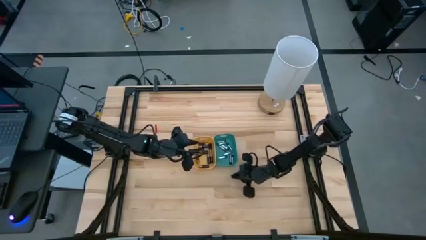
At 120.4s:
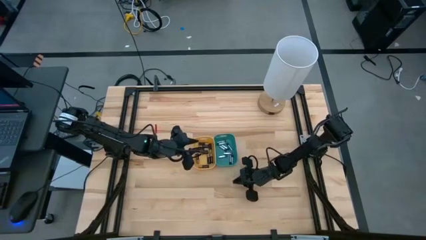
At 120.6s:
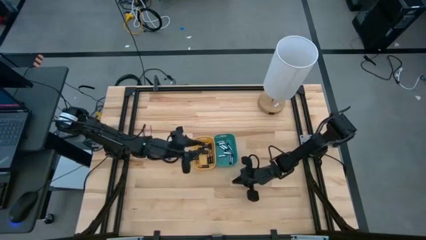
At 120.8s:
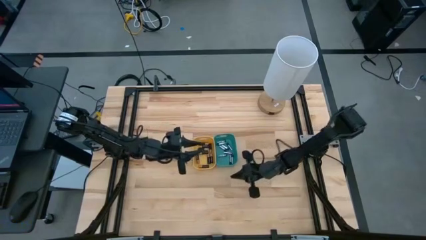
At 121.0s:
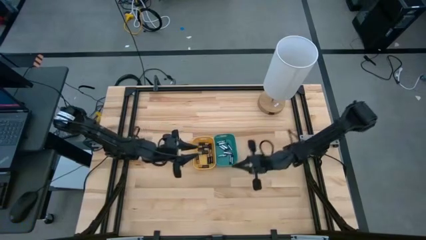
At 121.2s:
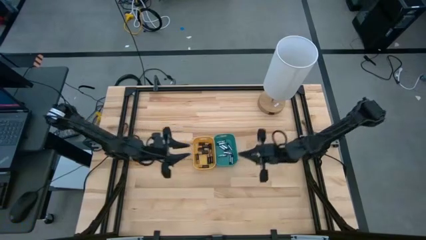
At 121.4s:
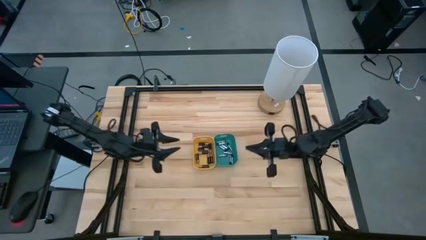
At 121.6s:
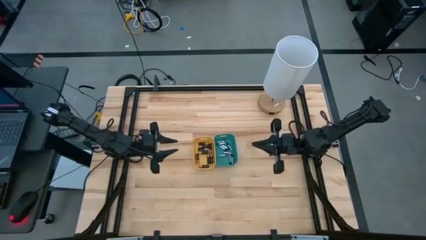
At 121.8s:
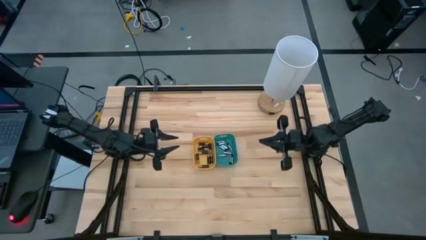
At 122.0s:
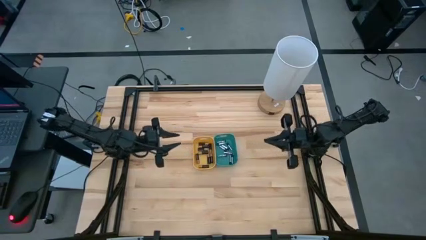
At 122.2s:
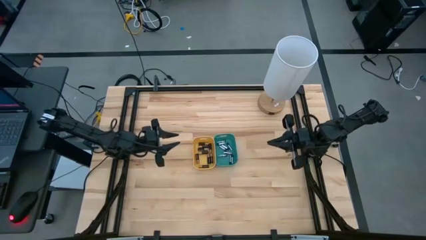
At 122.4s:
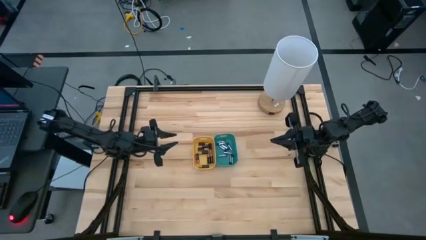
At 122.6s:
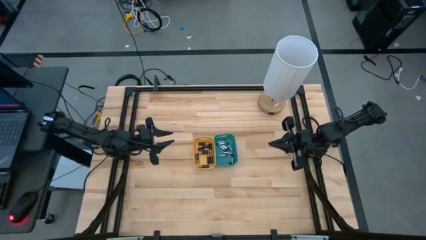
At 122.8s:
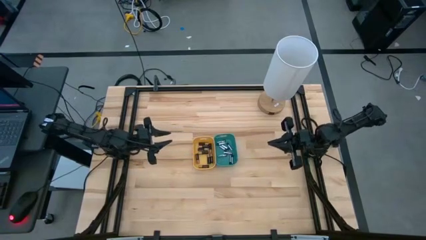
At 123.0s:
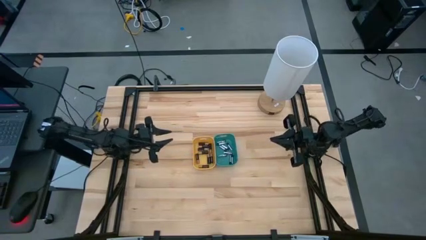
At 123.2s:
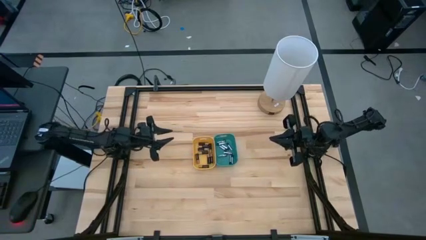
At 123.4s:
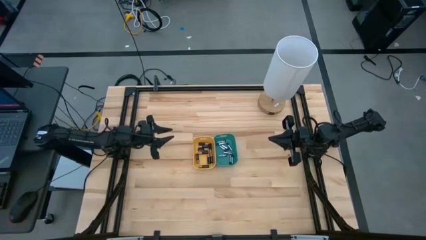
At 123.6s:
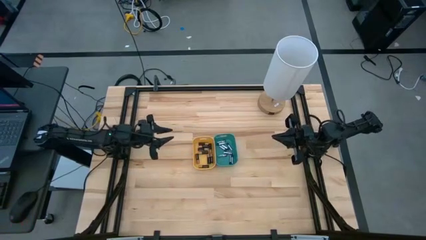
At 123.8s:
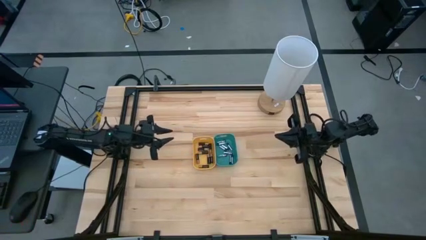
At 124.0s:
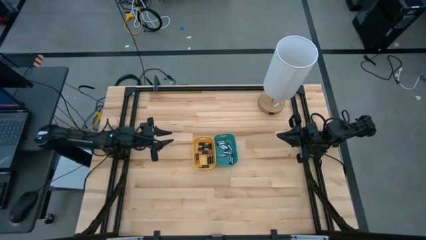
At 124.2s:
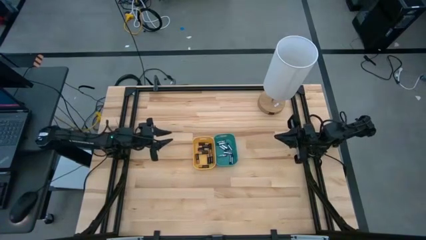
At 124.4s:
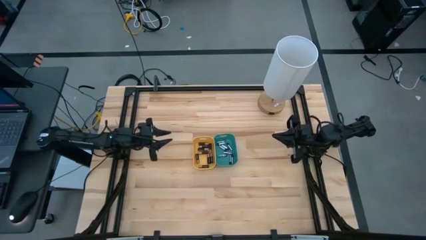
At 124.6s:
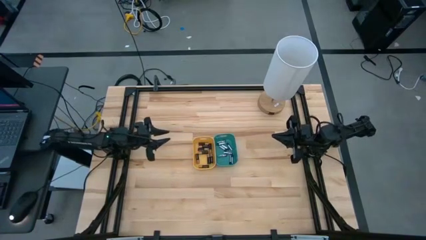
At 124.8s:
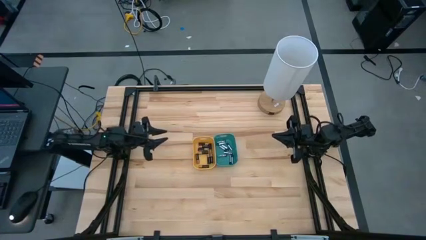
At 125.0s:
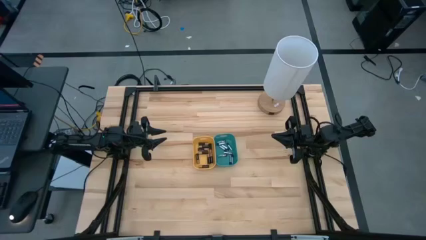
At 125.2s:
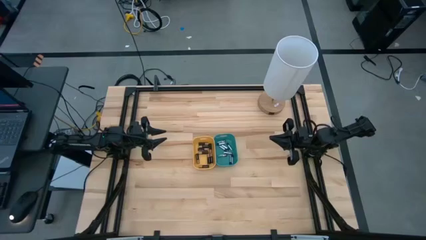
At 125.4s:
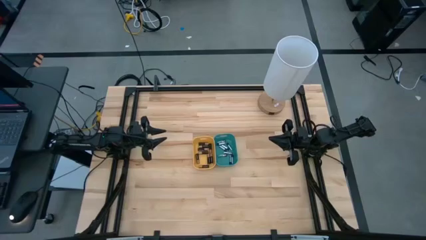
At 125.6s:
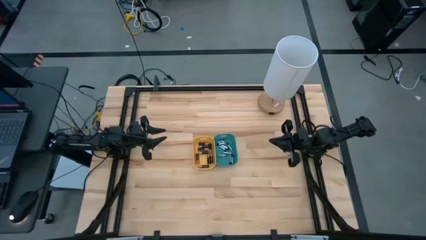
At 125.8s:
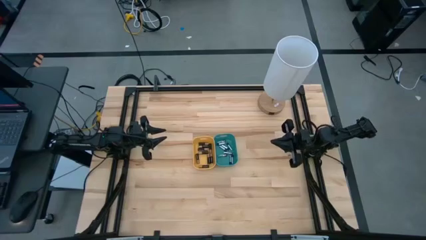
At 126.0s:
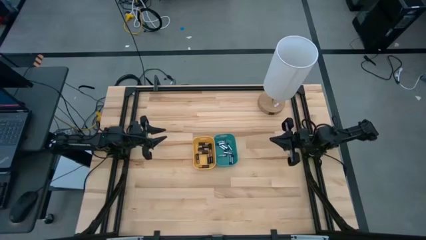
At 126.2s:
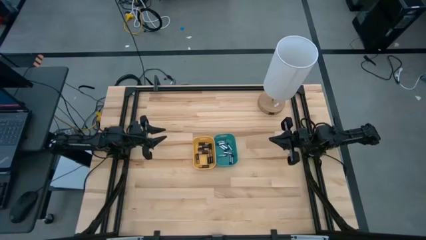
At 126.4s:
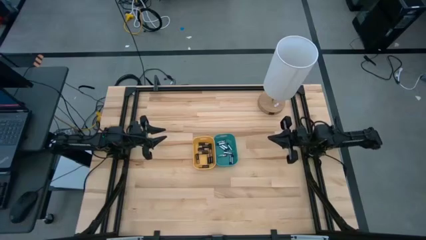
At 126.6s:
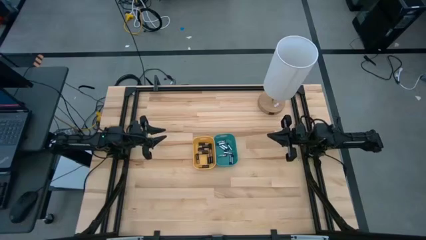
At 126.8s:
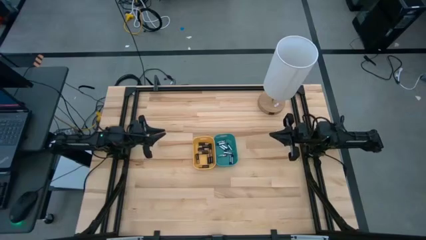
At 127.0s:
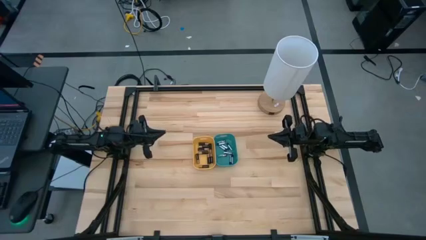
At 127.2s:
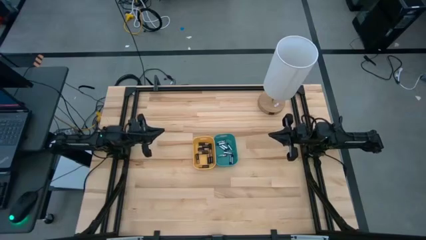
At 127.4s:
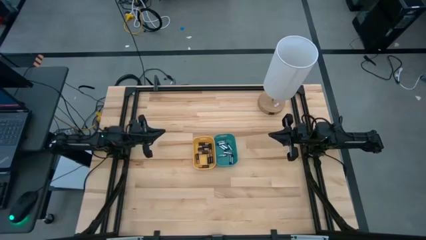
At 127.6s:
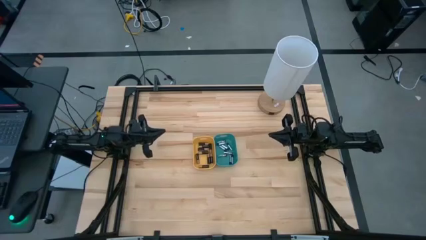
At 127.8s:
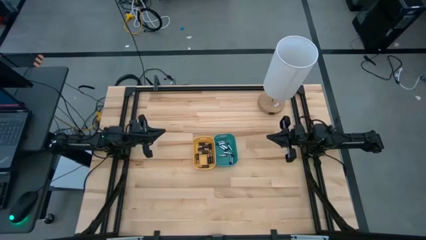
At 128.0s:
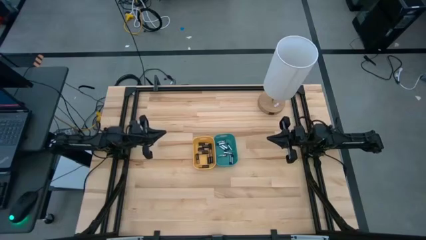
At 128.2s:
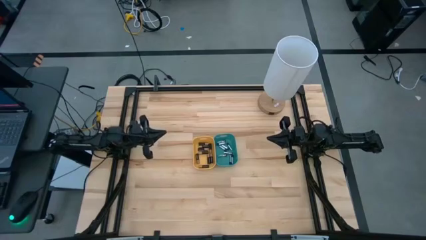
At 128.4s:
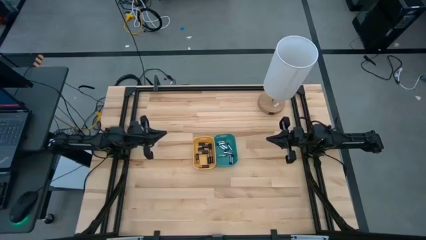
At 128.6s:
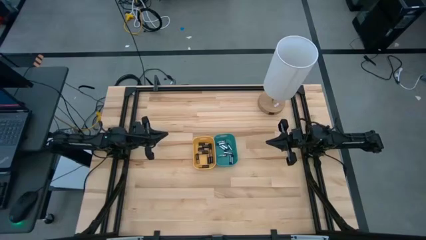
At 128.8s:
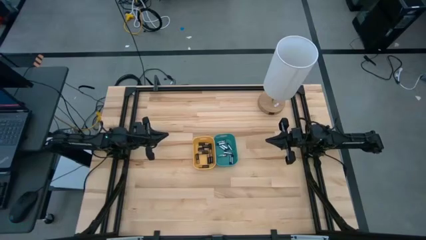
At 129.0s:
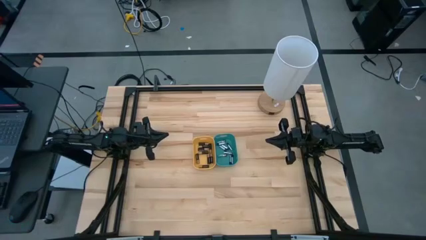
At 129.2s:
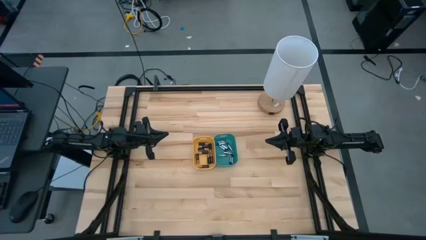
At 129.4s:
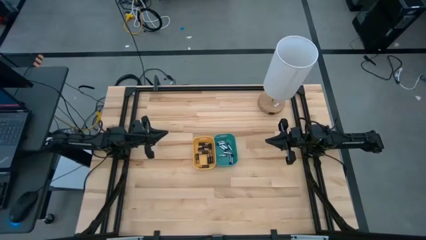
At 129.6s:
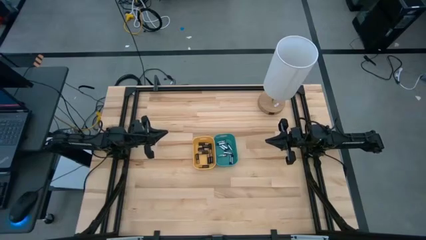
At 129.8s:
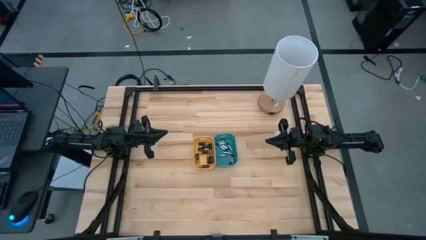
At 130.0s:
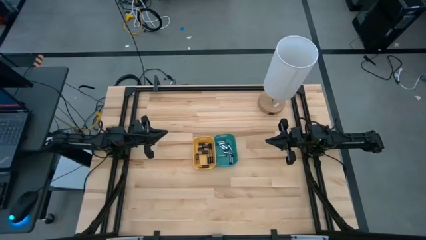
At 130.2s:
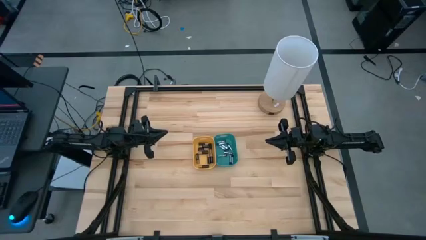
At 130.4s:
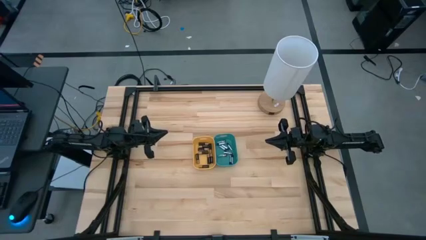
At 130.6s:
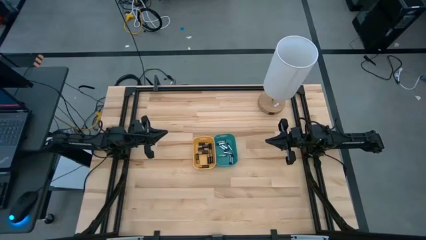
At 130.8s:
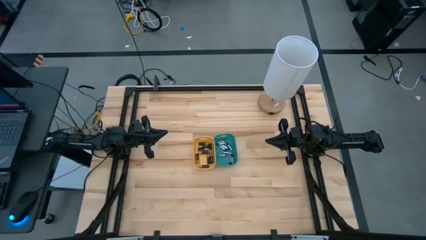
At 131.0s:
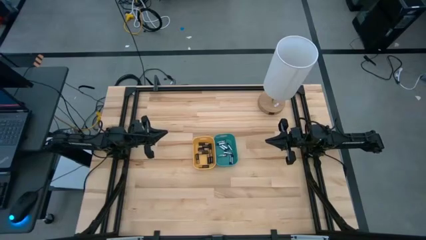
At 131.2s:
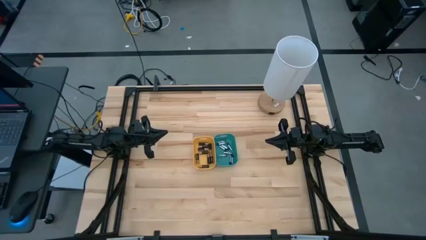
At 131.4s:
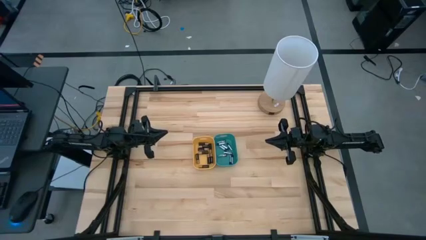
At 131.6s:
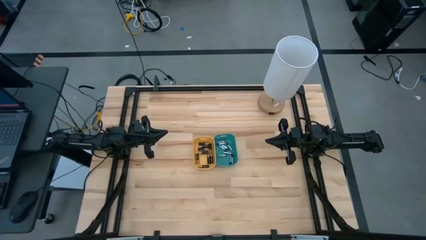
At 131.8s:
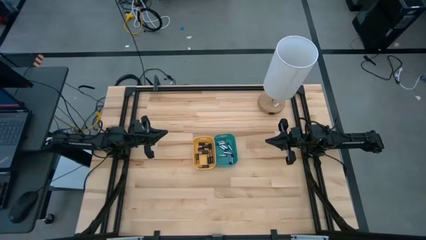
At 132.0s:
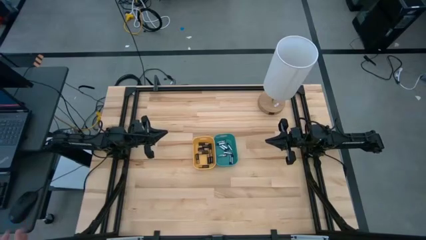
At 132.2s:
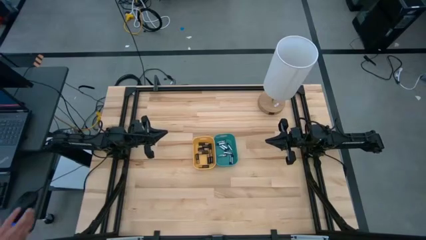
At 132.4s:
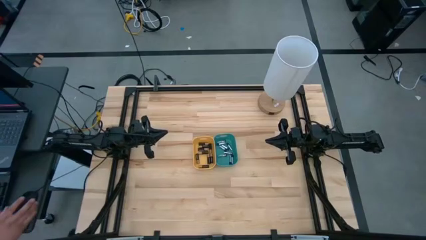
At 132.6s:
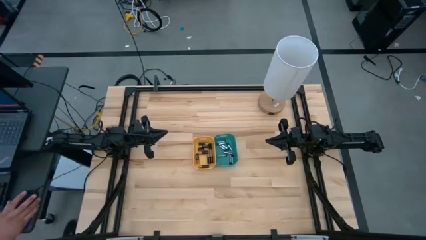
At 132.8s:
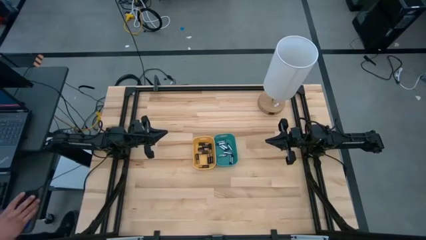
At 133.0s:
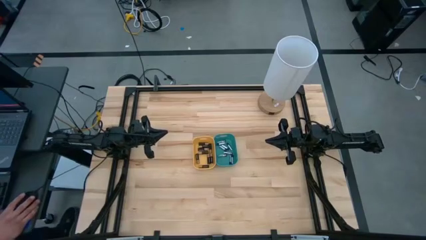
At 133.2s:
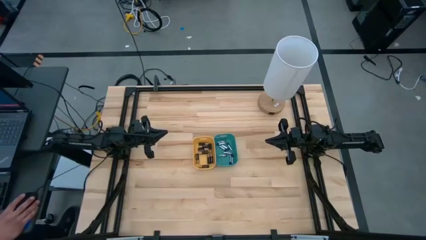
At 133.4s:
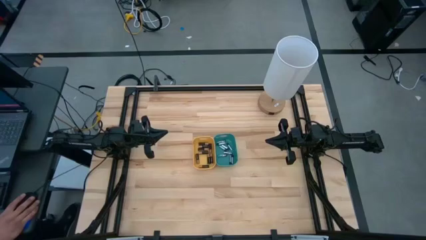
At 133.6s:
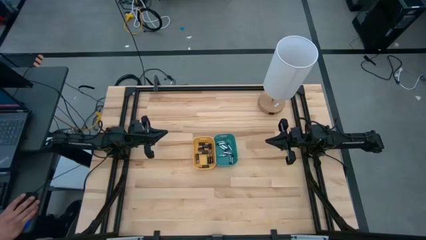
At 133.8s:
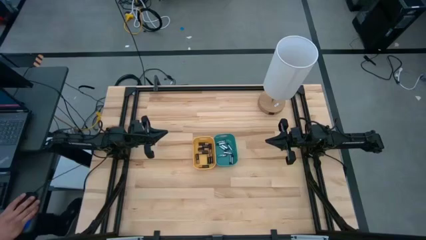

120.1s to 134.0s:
Task: Sort batteries
Return to Home Position

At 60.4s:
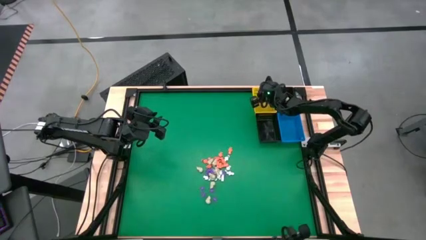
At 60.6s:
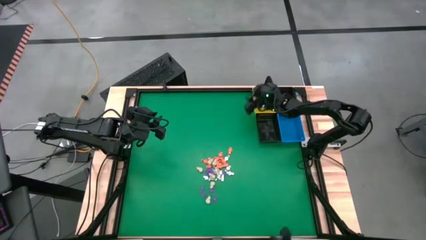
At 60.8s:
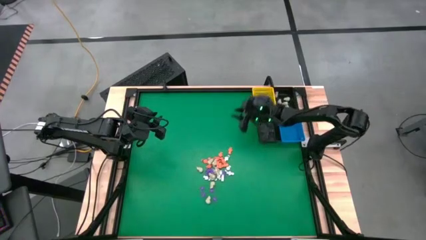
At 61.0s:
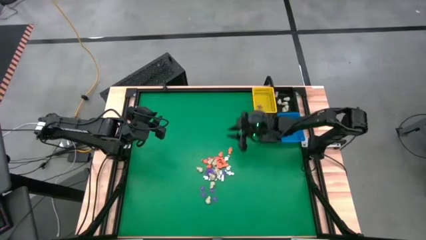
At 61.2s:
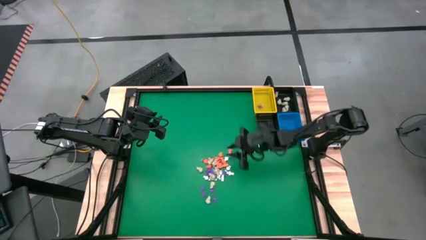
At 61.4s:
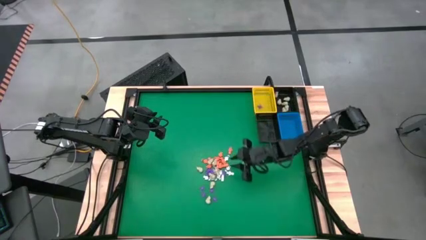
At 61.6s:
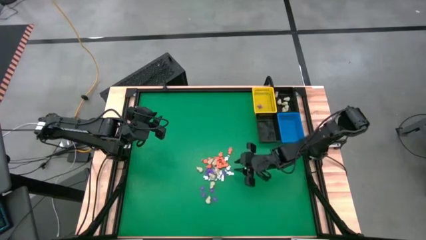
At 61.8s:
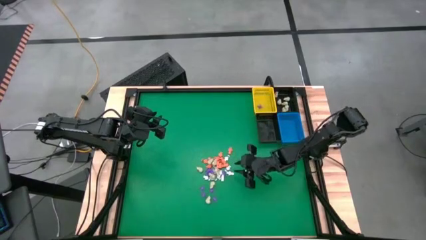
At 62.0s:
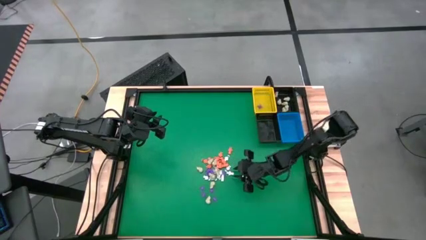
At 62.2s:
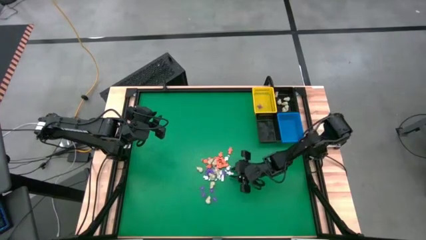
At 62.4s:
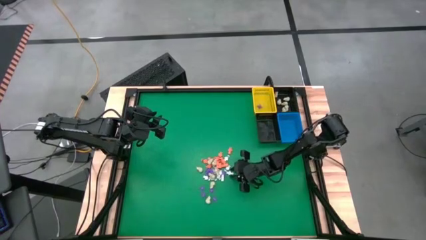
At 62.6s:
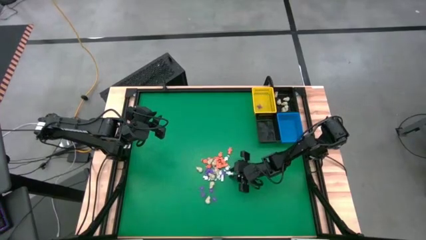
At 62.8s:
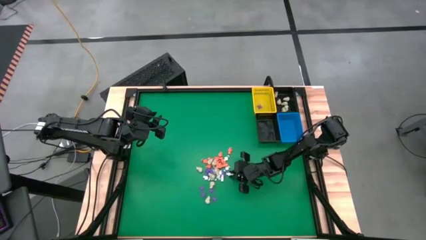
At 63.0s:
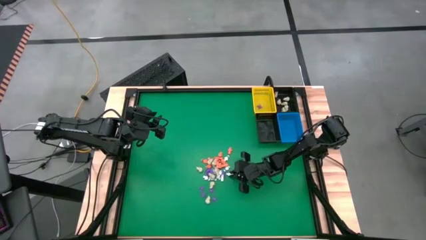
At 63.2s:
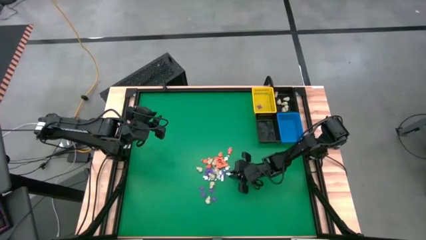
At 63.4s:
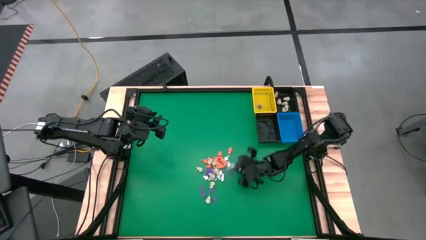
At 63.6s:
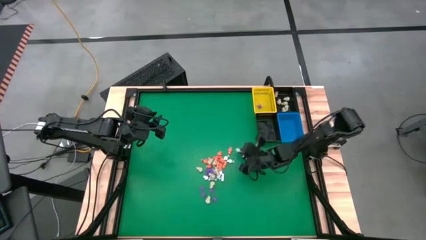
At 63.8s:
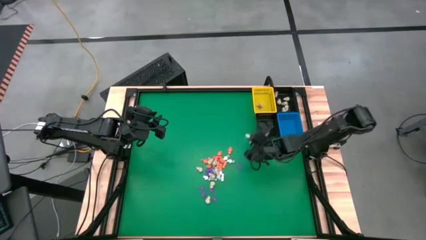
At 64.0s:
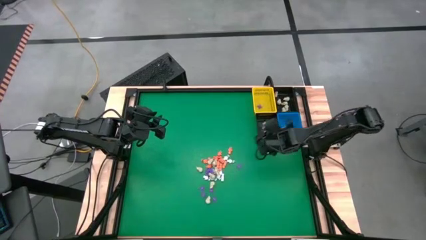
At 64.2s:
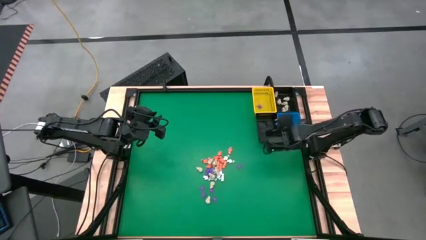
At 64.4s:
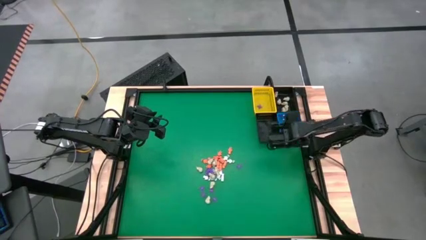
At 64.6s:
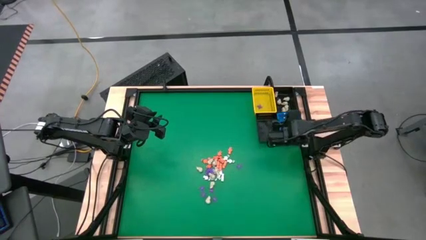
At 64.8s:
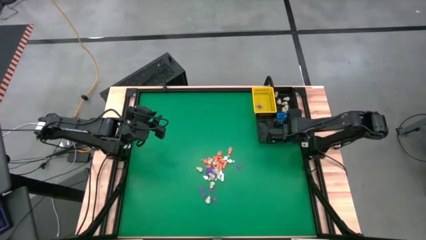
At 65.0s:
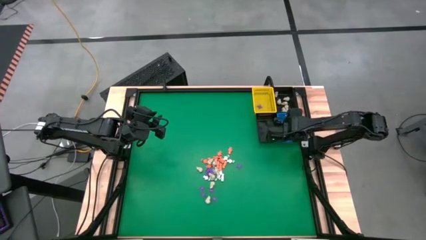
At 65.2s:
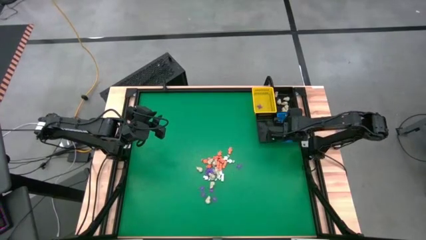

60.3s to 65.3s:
Task: Sort Halloween decoration
Put the white skeleton toy into the blue basket
